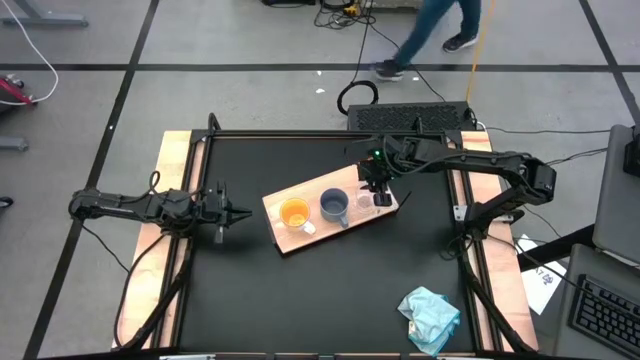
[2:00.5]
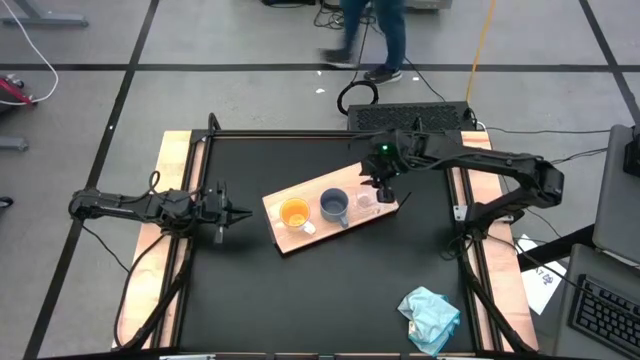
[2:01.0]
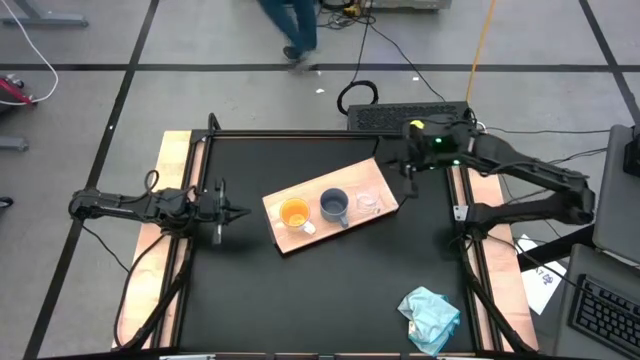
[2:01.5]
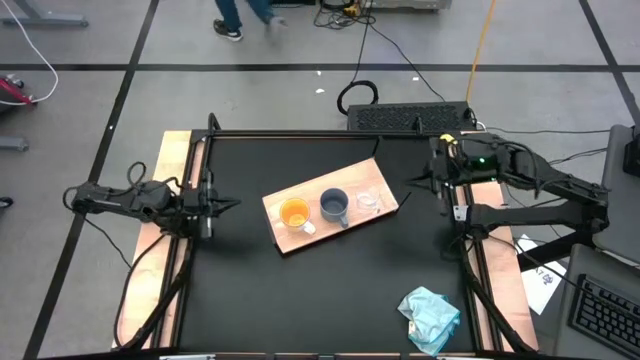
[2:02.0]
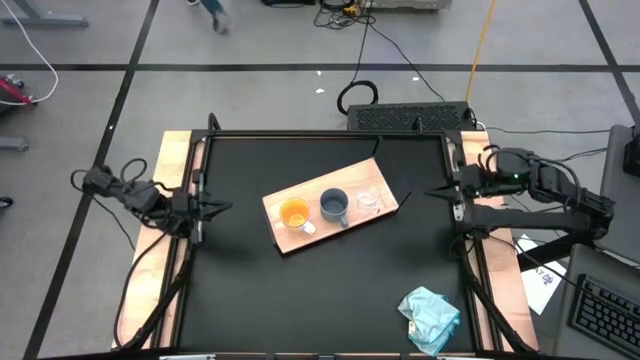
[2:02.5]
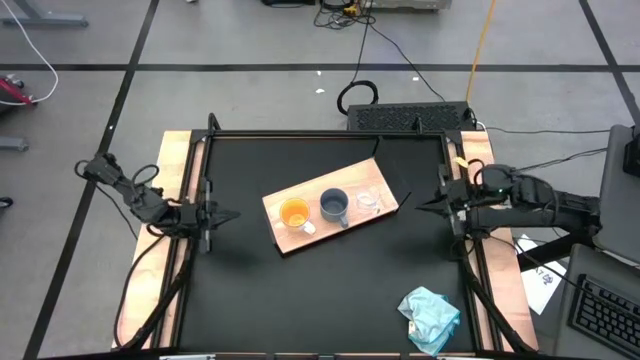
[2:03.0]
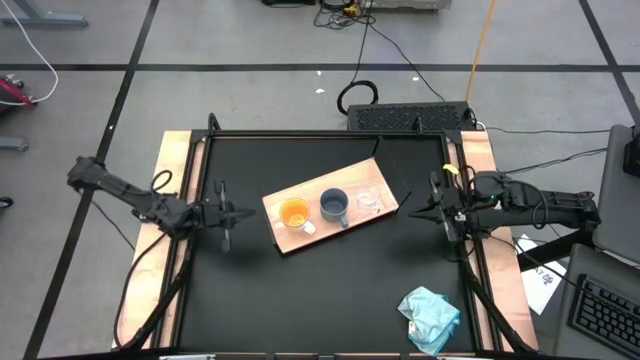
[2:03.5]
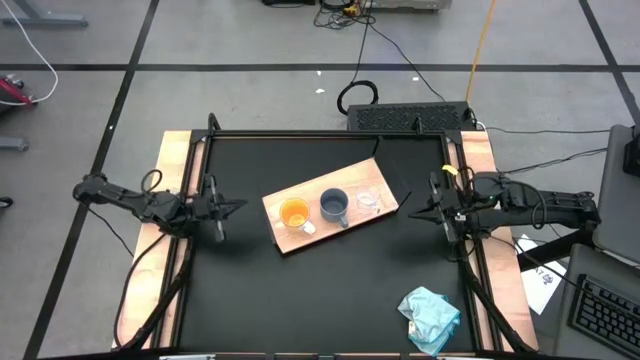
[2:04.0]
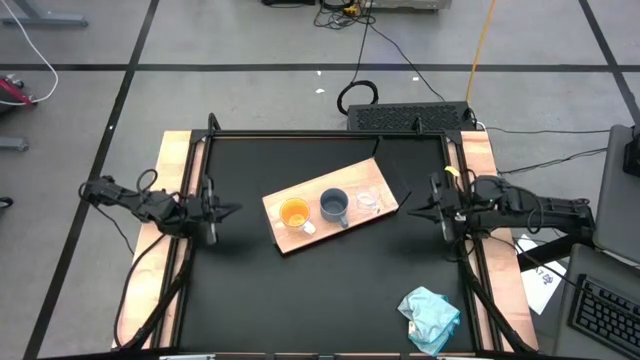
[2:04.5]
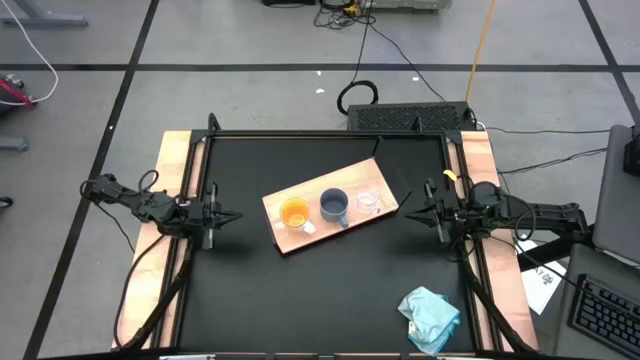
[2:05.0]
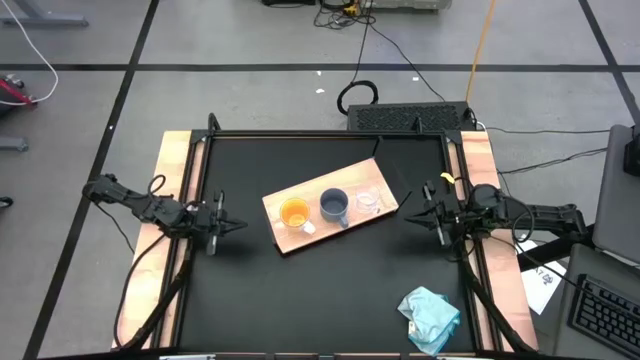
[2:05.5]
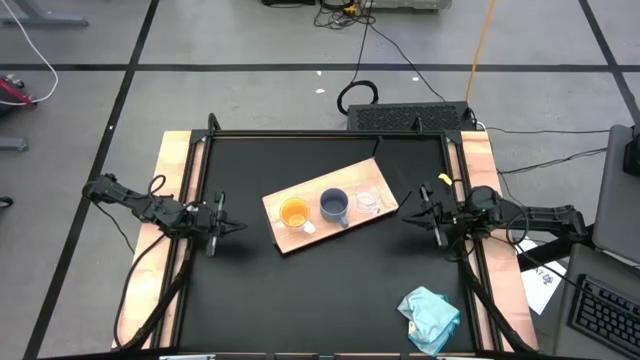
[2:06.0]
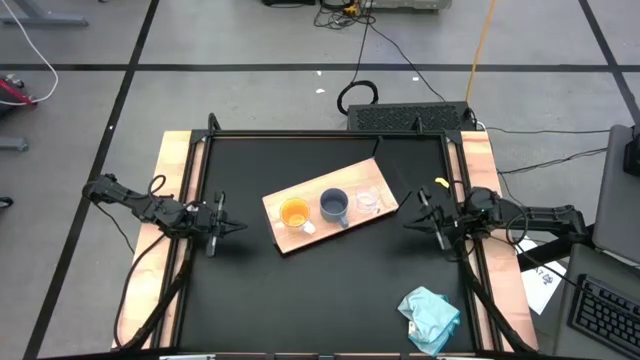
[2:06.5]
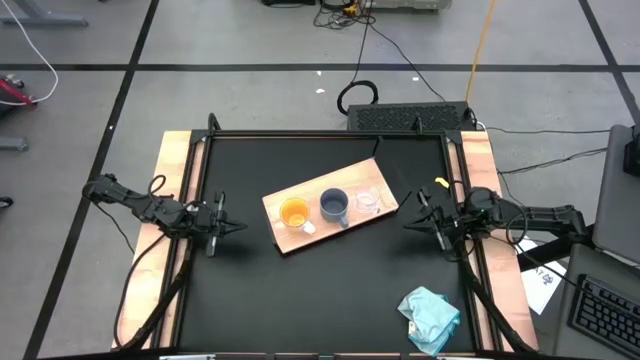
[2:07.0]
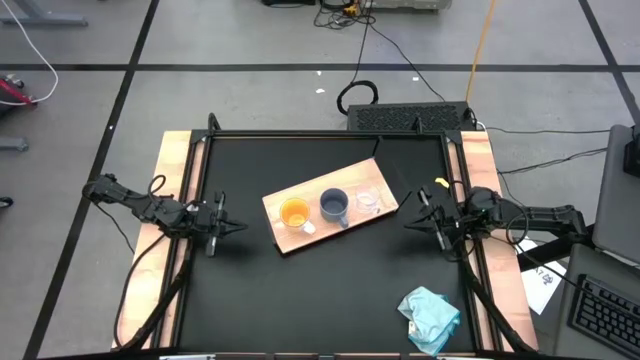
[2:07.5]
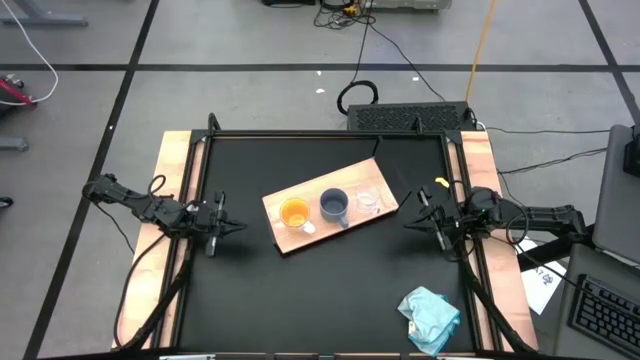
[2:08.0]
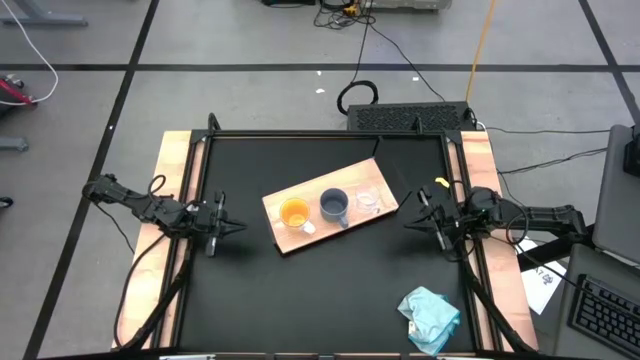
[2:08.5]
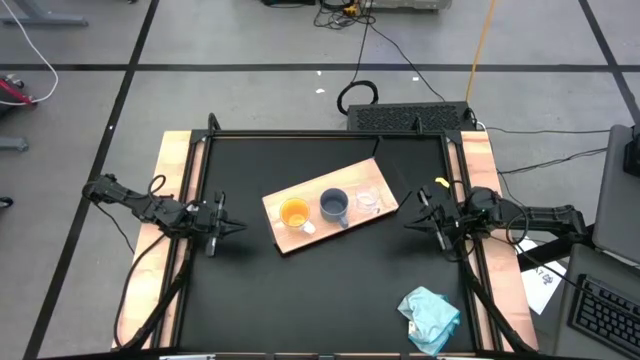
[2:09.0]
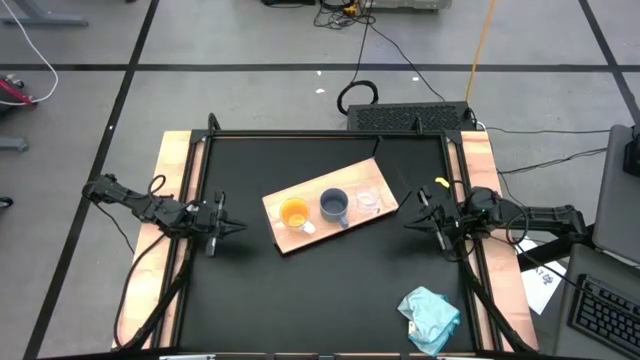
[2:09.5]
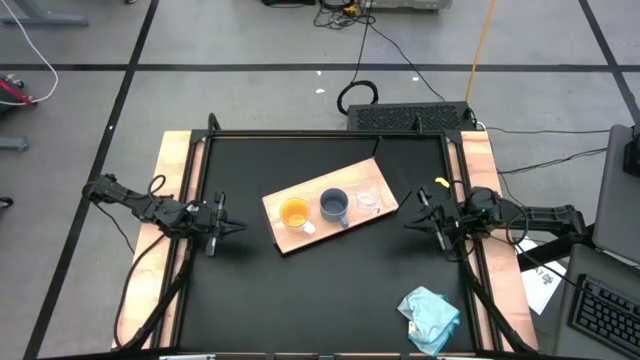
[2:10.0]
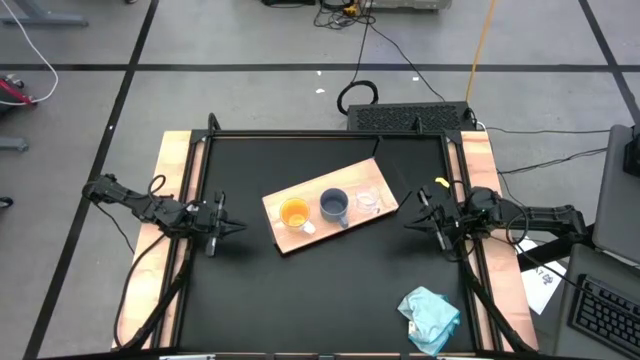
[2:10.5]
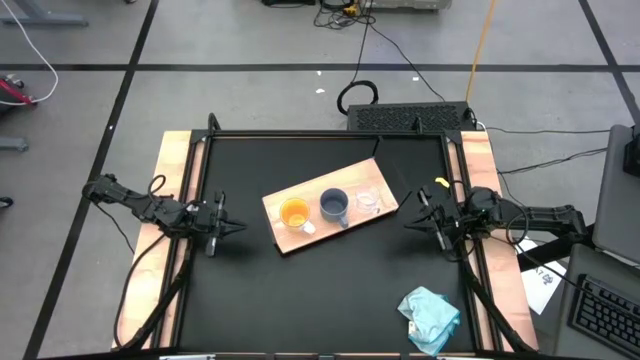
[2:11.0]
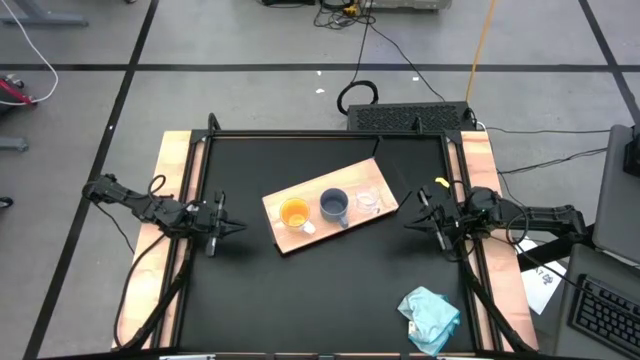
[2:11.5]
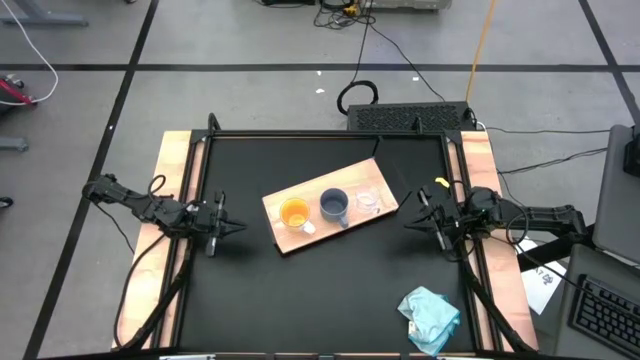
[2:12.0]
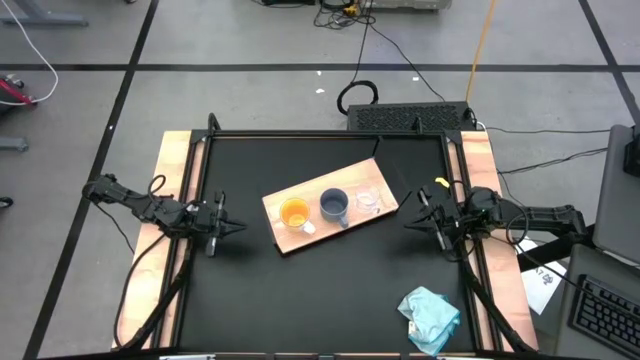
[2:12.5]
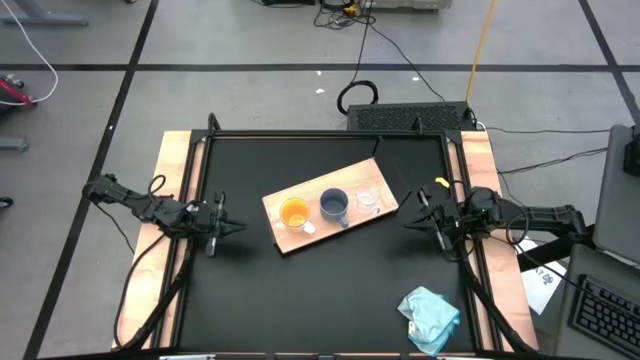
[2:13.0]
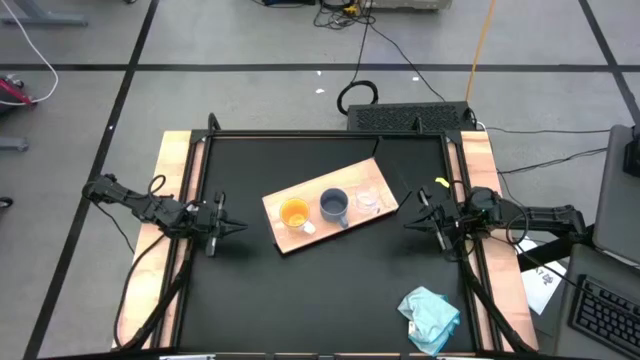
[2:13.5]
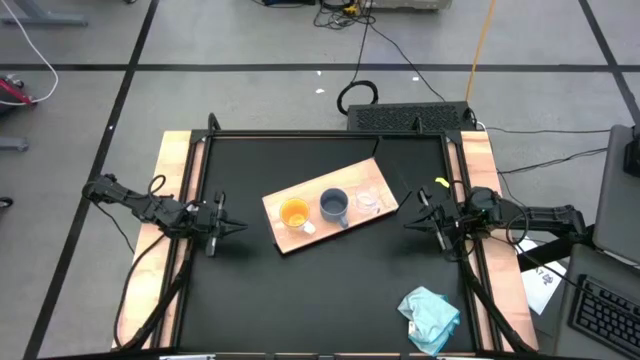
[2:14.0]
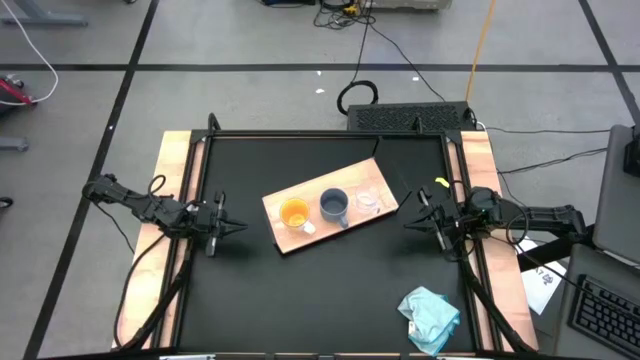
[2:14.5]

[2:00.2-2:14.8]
Task: Stack small to large cups/mugs on shelf
Return to home position

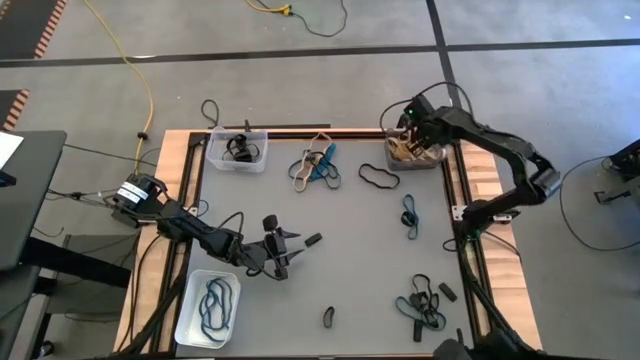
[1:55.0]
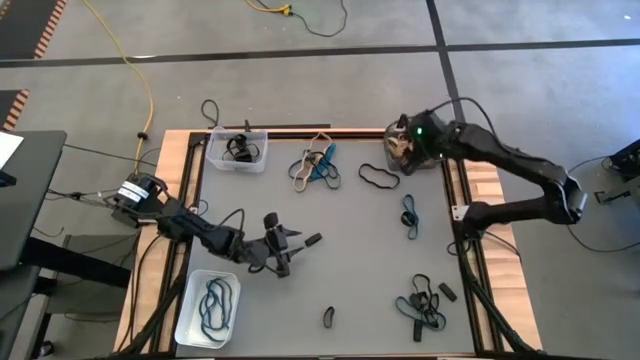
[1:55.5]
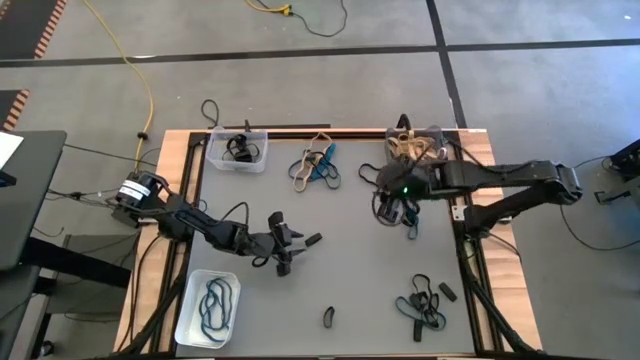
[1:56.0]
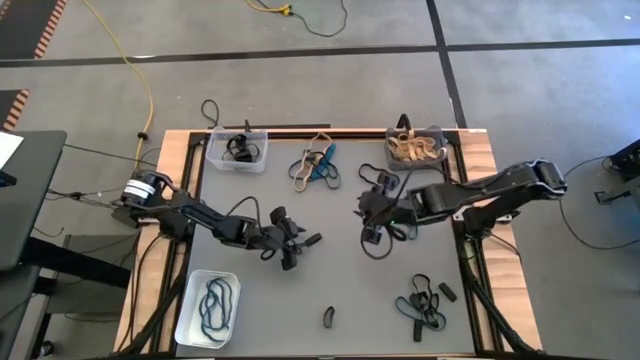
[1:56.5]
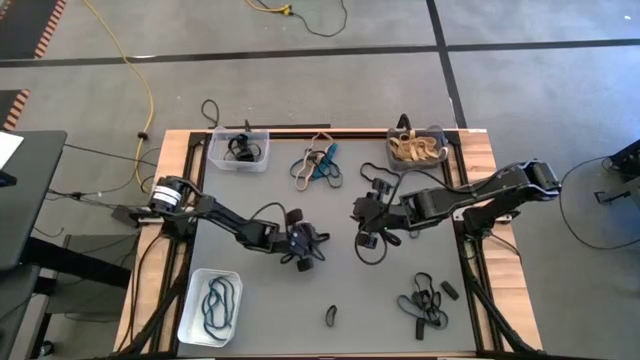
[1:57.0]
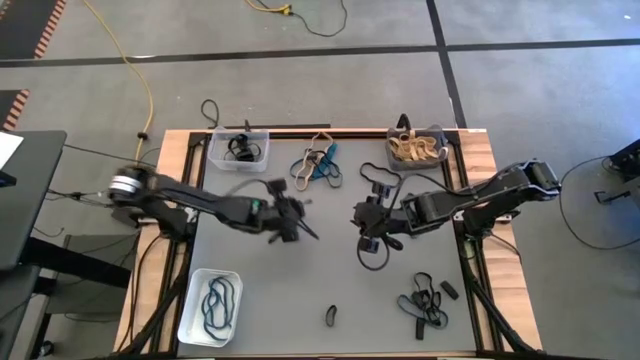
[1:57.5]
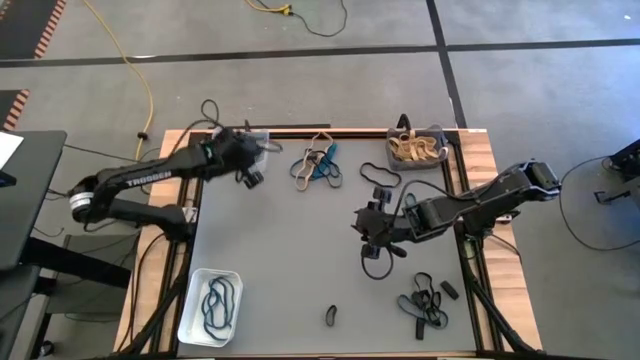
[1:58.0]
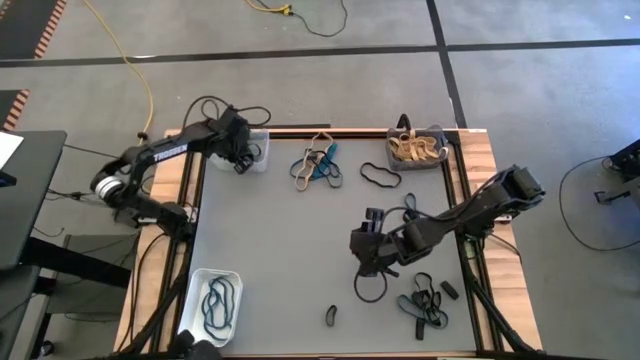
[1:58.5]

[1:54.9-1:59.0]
Task: Sort rubber bands into baskets
Put the black rubber band into the transparent bin
